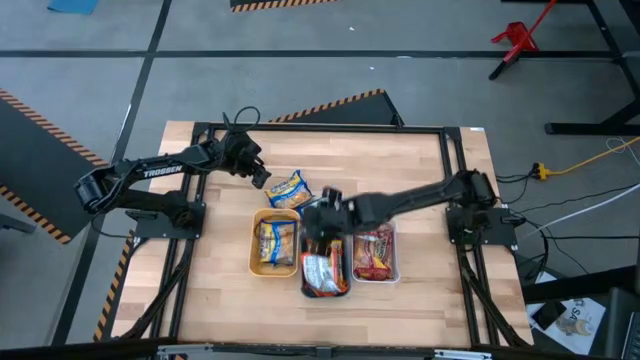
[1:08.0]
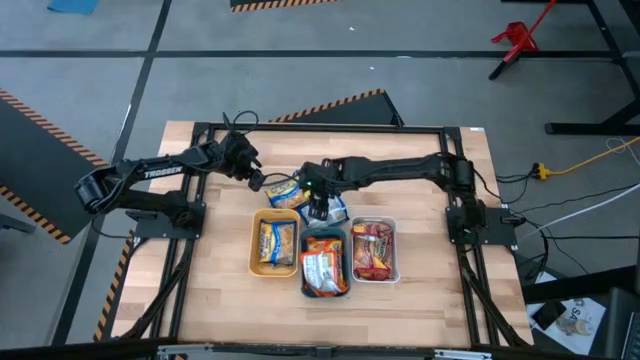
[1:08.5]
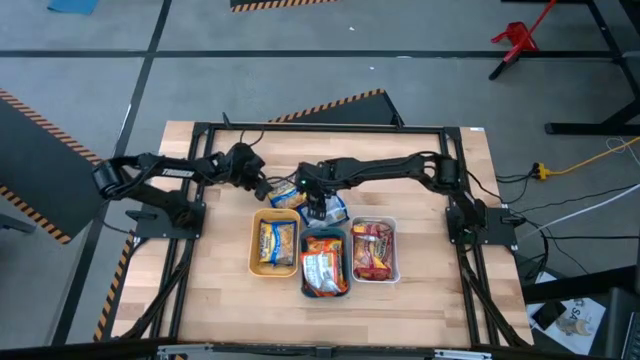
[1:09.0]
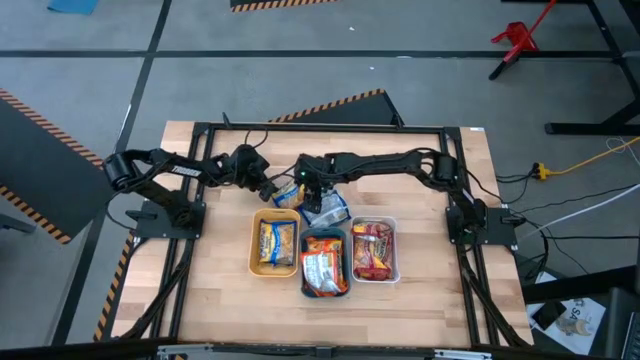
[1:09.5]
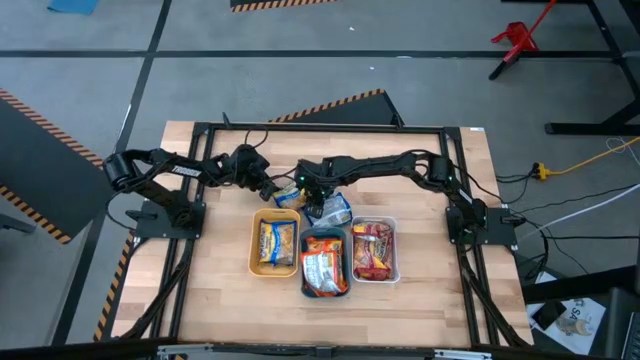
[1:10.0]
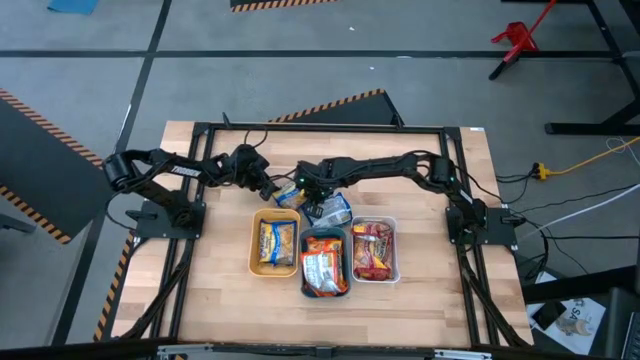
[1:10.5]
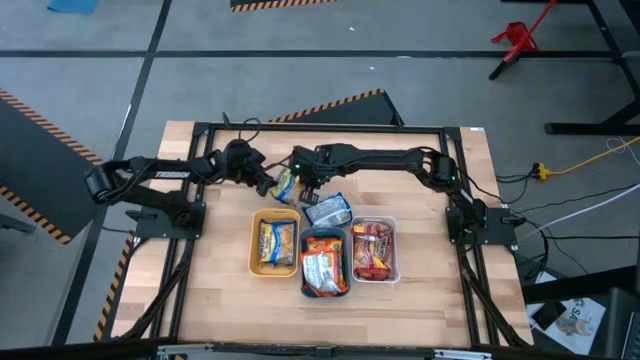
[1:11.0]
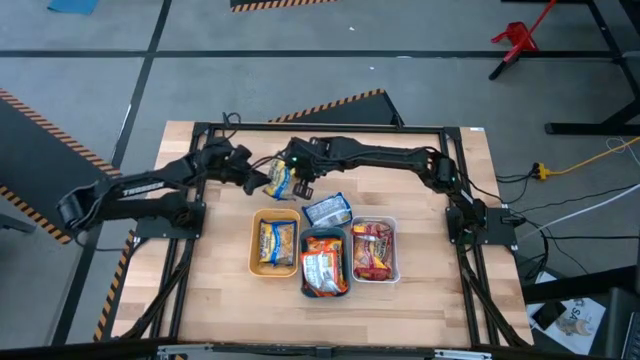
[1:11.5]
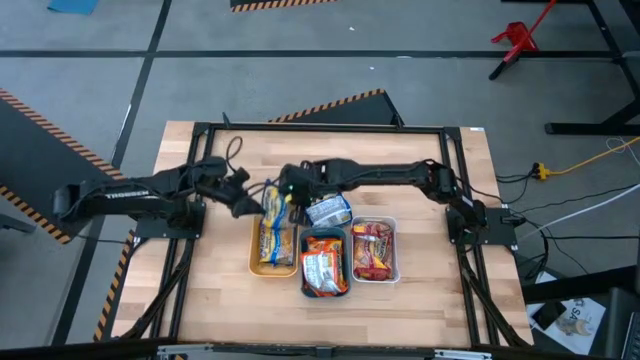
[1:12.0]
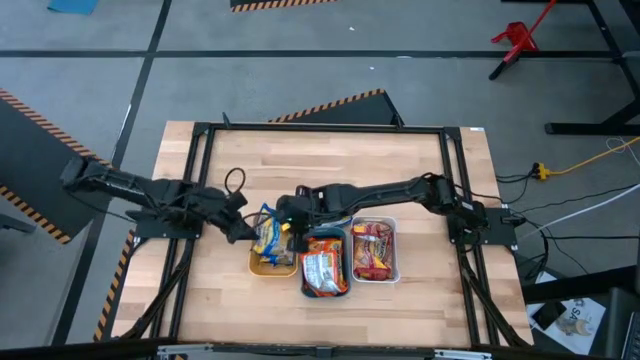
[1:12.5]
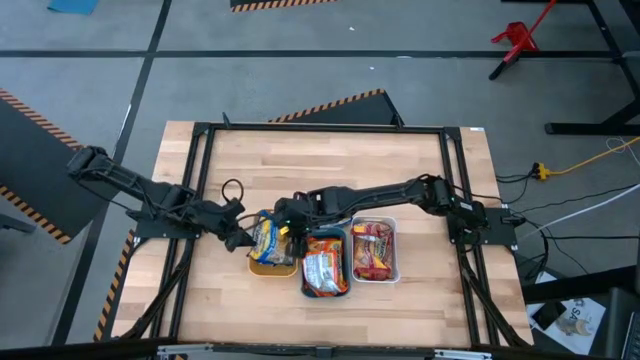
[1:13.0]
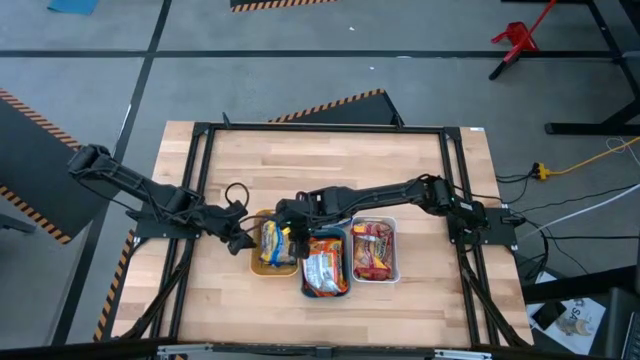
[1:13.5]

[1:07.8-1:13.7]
Task: Sort Maruchan noodles
Put the center blue noodle pack into the yellow bin

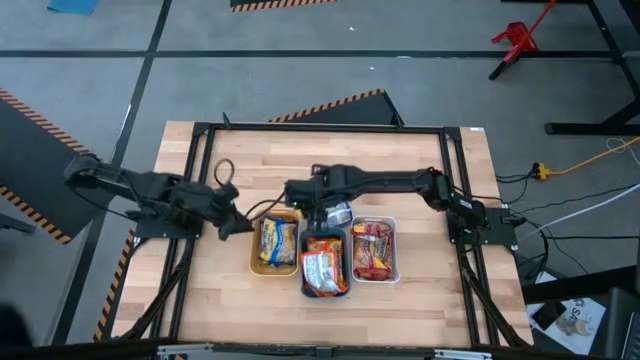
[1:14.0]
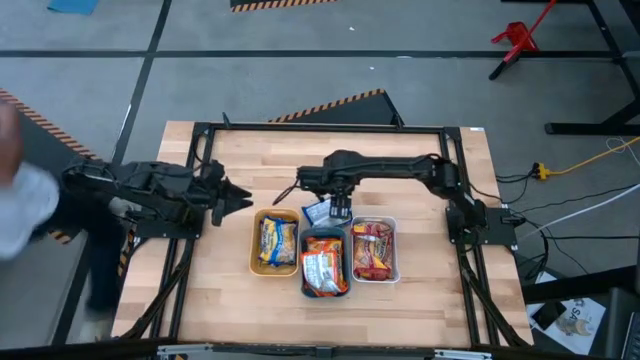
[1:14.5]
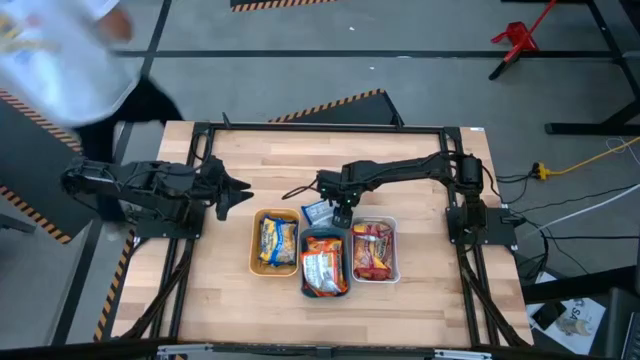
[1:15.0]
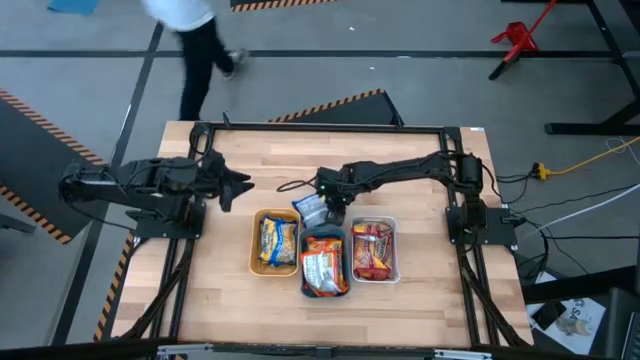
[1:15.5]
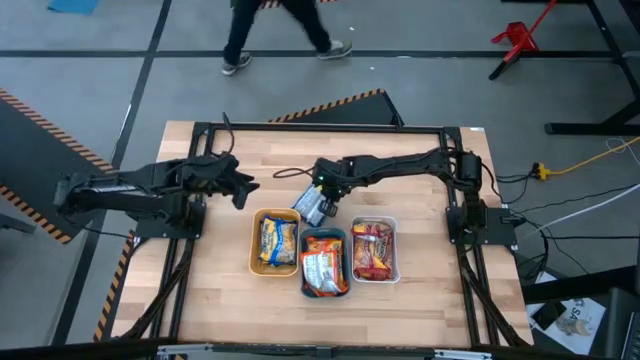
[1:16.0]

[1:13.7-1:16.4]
Put the blue noodle pack into the yellow bin

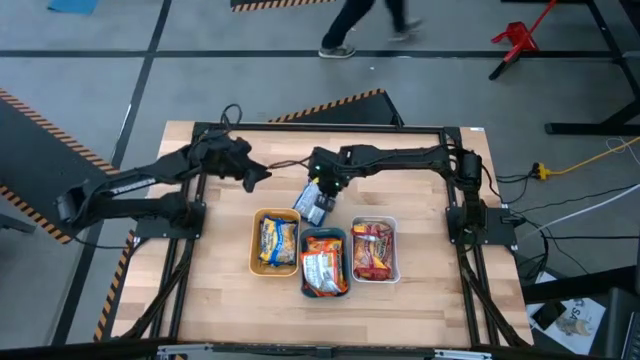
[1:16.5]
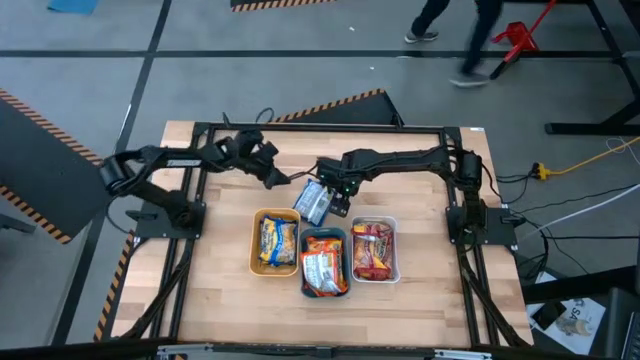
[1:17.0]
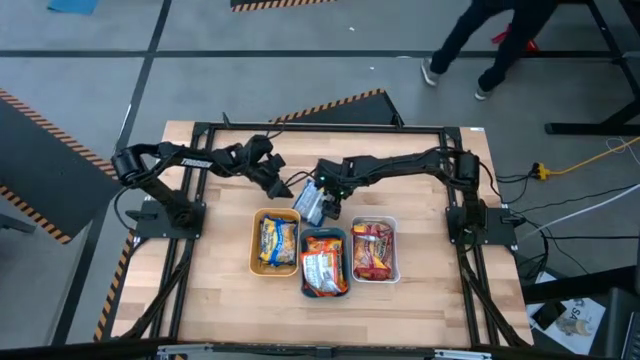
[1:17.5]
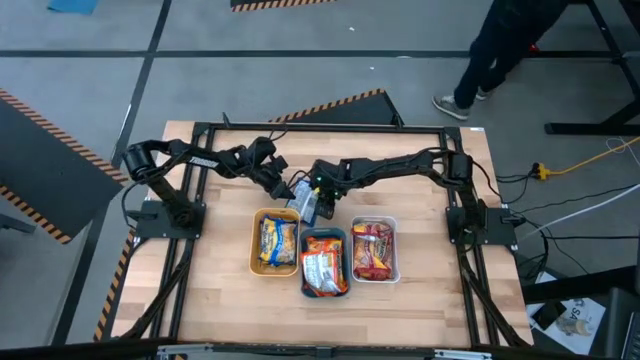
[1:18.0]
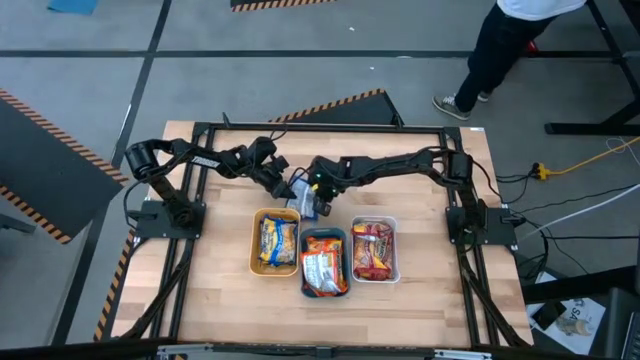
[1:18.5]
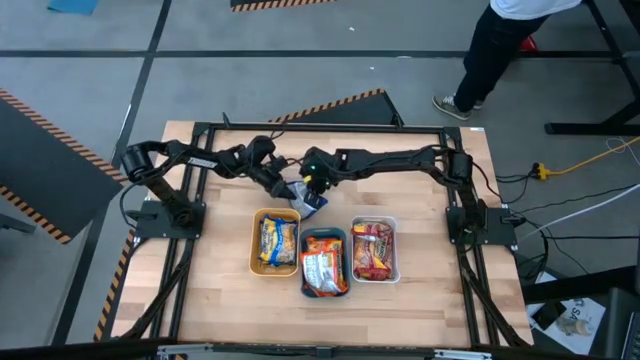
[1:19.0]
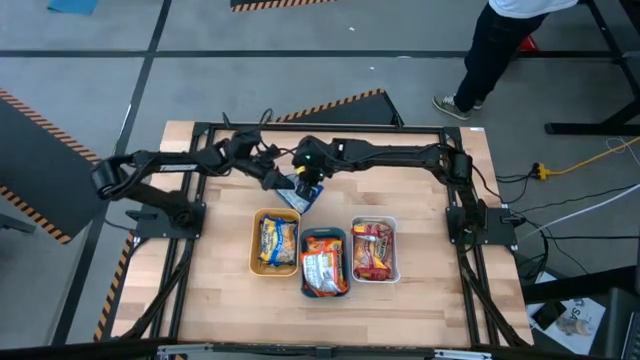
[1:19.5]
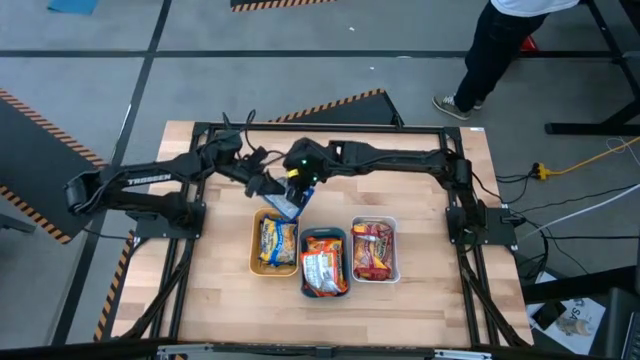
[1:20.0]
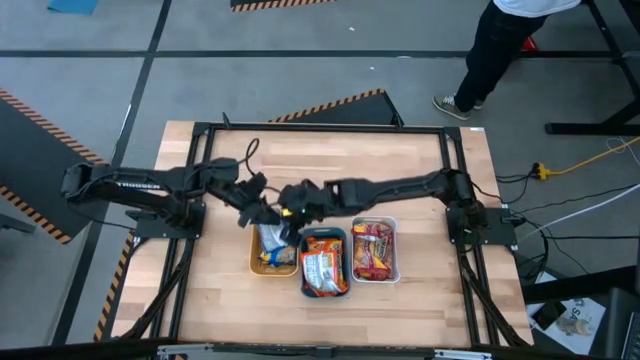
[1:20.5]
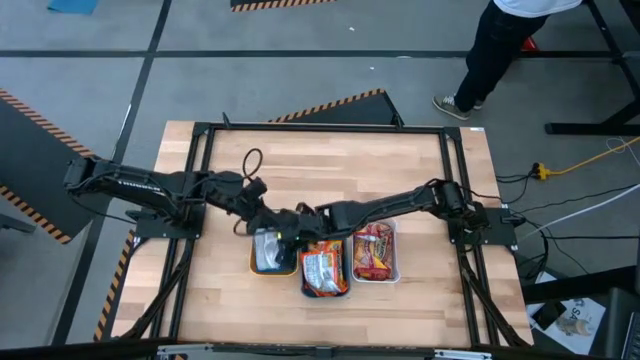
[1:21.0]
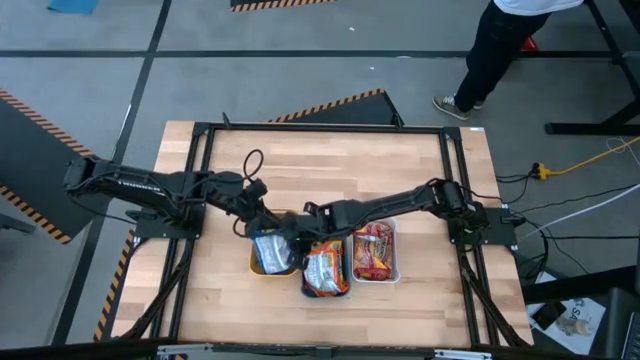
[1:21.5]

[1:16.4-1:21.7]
Put the blue noodle pack into the yellow bin

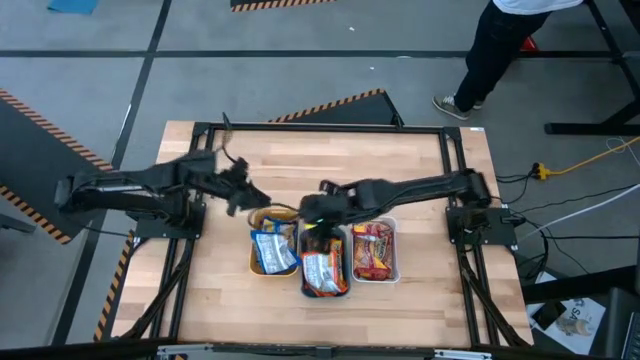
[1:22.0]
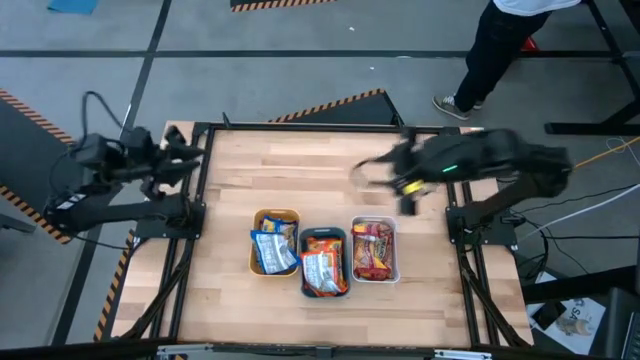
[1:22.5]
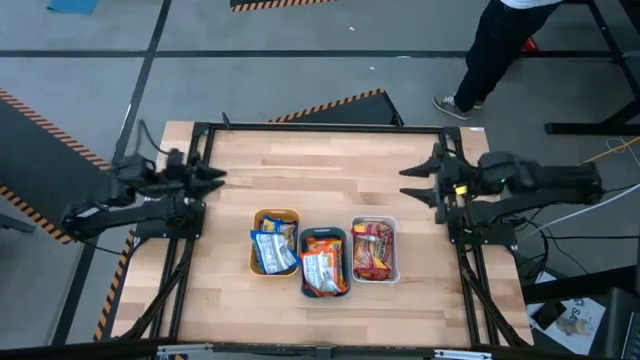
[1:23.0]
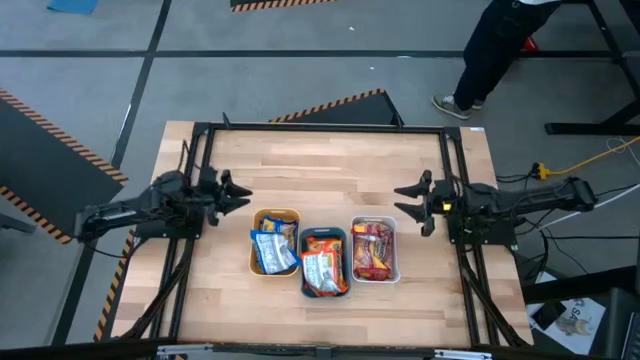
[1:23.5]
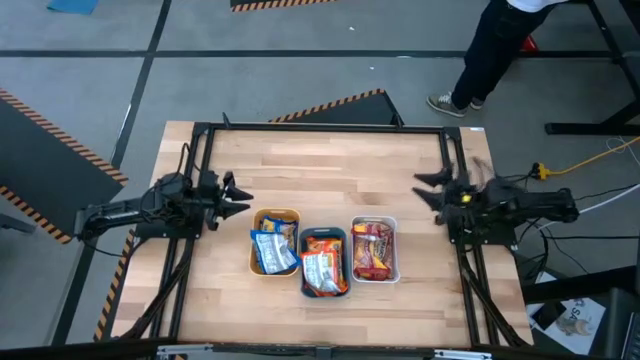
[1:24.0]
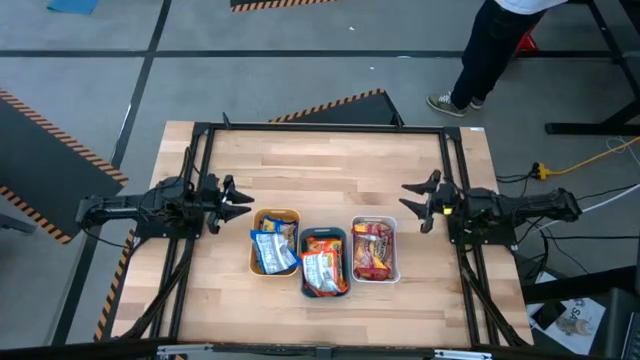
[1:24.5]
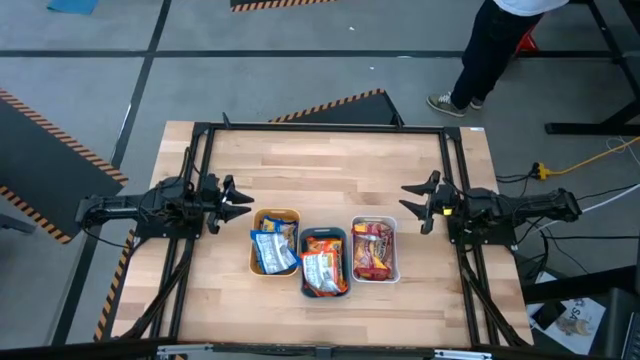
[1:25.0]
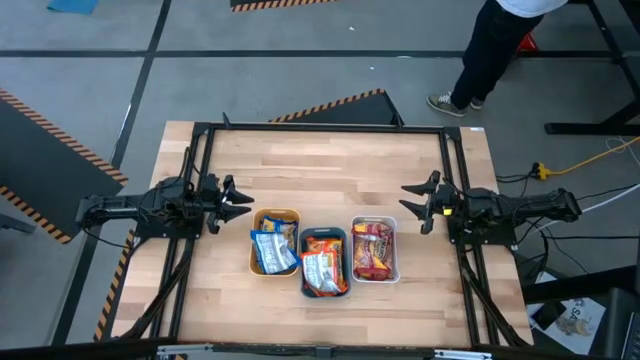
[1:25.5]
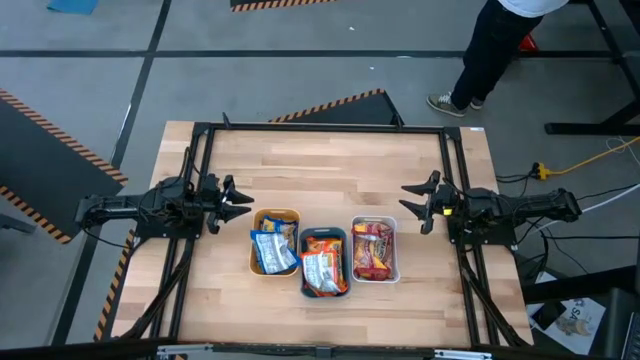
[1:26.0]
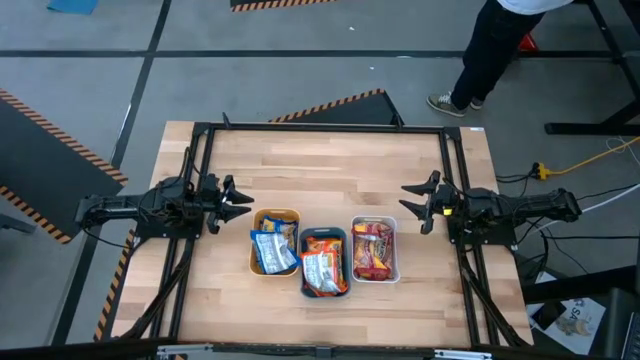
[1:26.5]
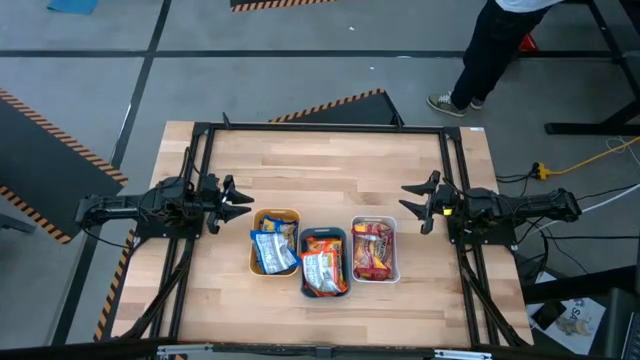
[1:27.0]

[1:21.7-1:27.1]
Return to Home Position

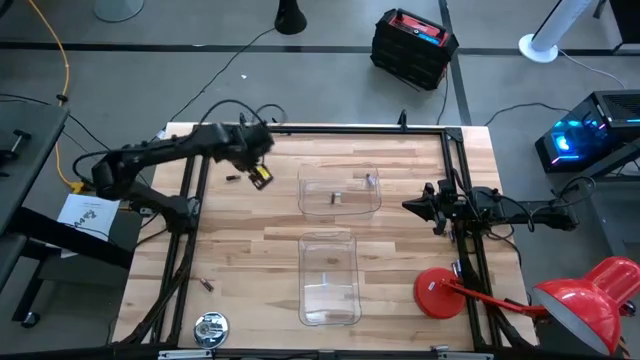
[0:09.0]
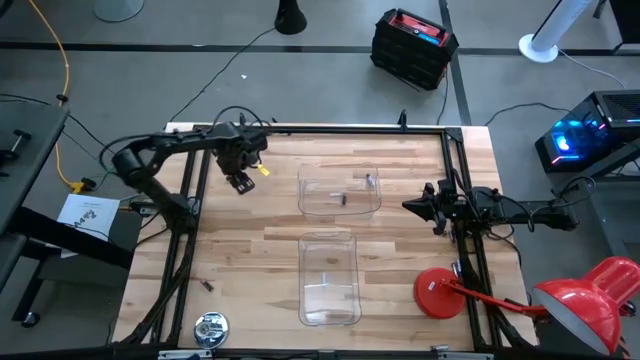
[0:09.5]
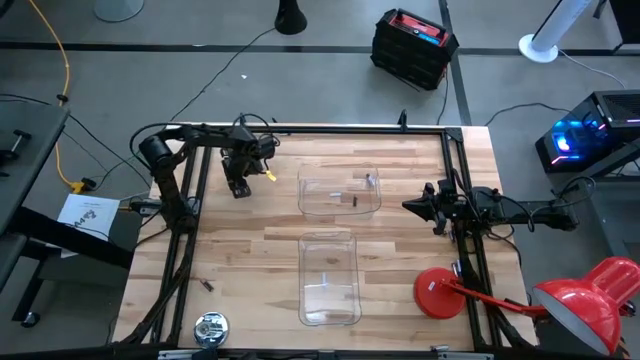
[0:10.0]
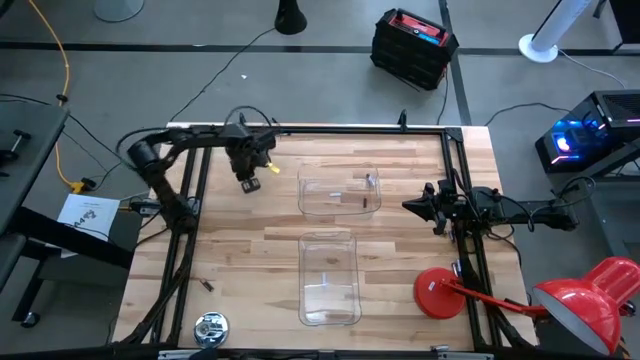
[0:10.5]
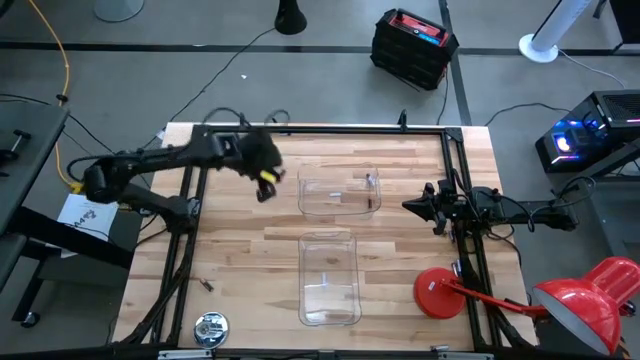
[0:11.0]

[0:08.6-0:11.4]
Task: Sort batteries
Put the black battery into the top transparent bin
